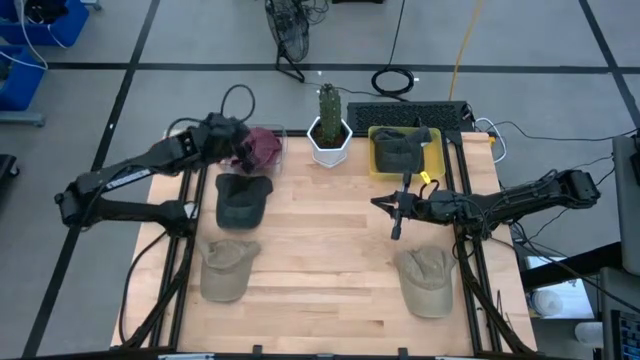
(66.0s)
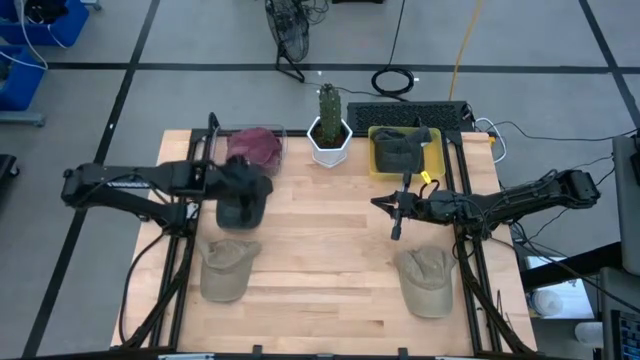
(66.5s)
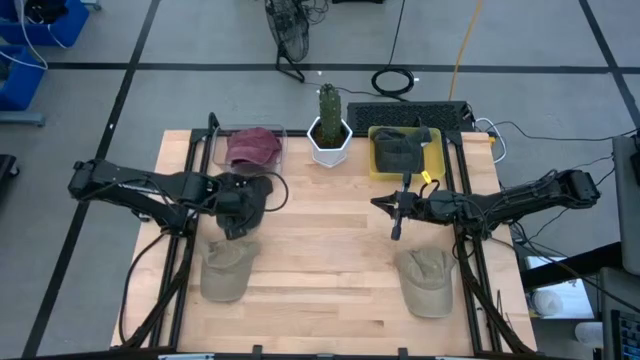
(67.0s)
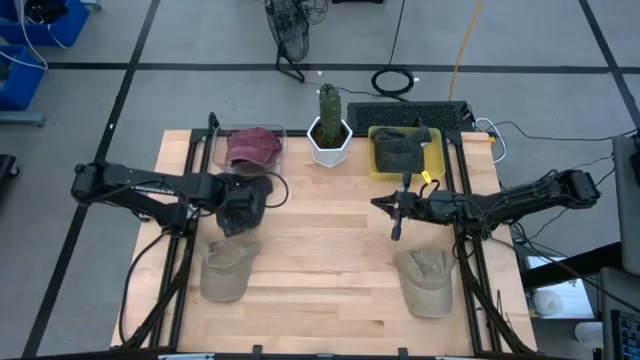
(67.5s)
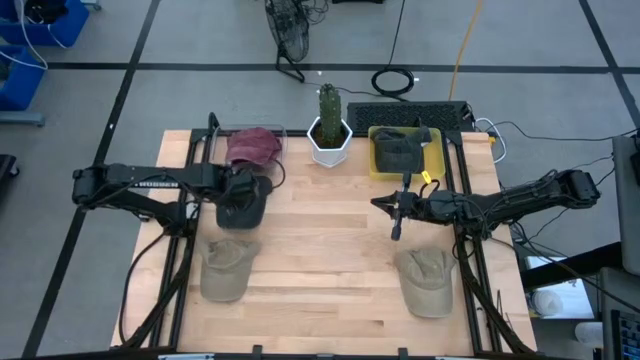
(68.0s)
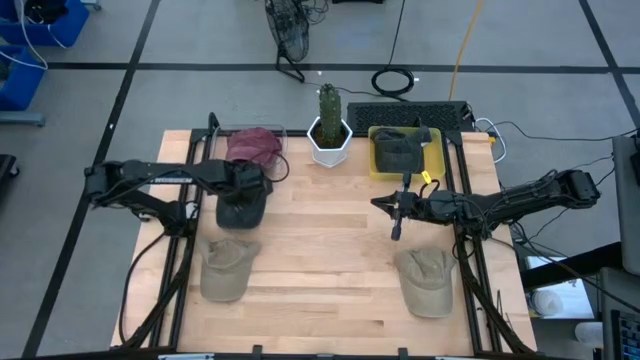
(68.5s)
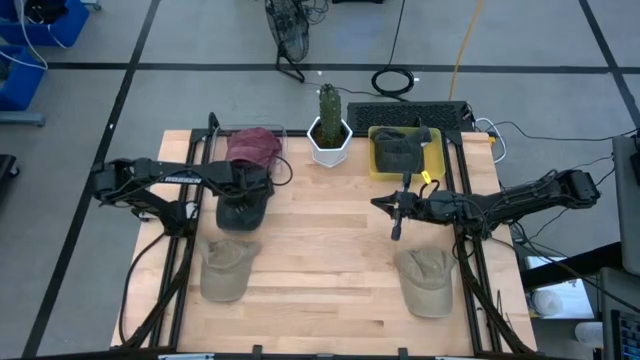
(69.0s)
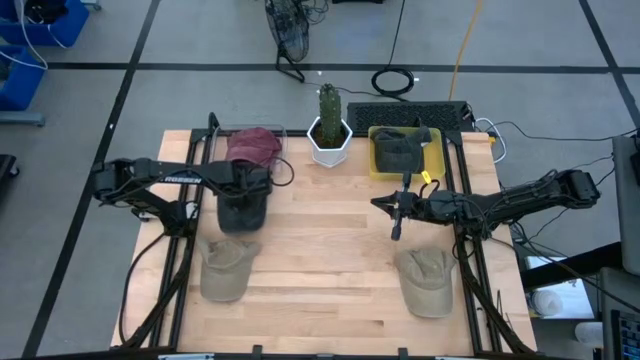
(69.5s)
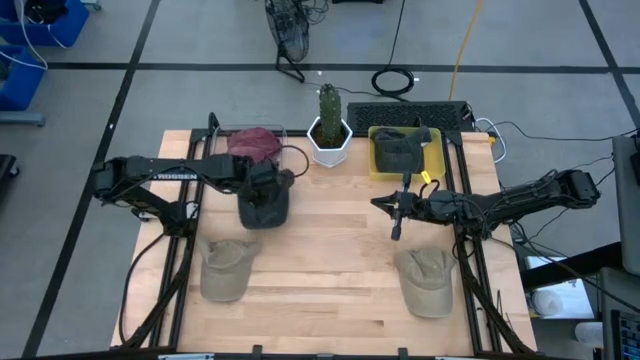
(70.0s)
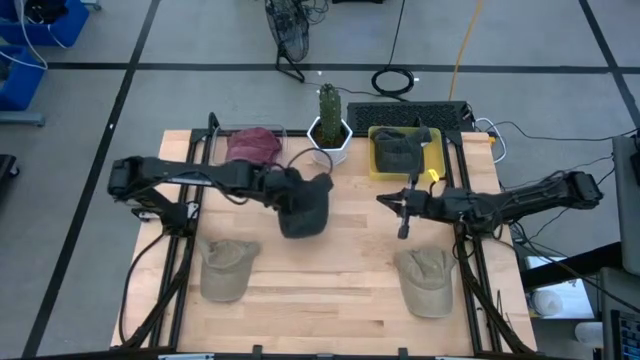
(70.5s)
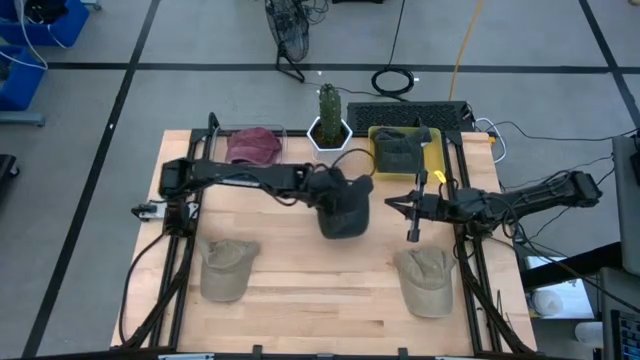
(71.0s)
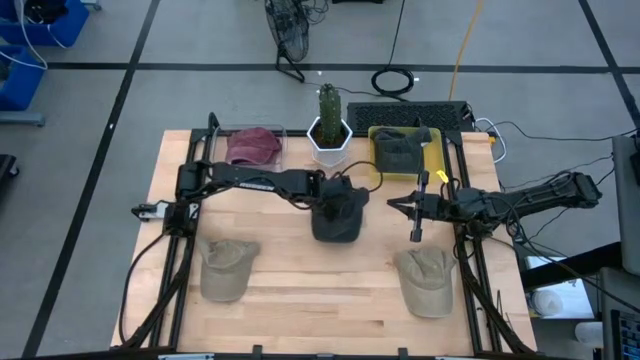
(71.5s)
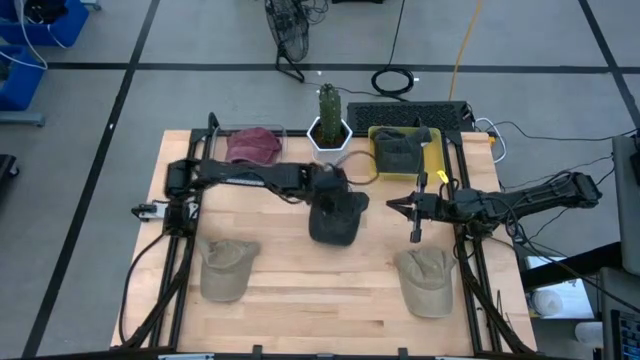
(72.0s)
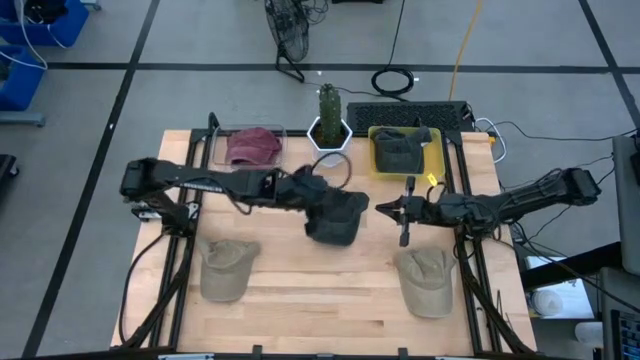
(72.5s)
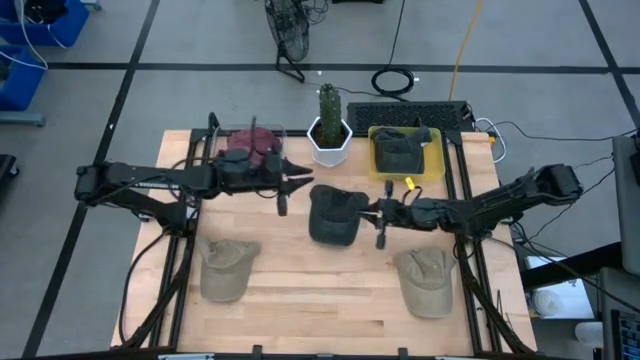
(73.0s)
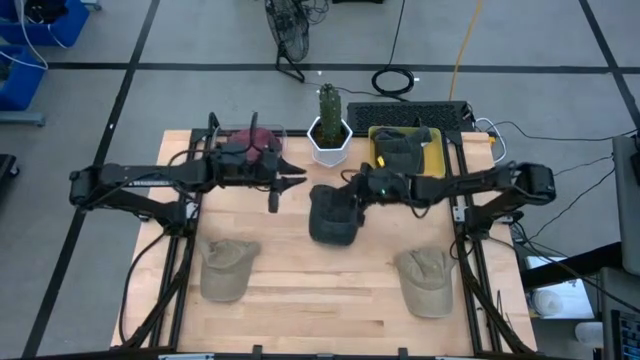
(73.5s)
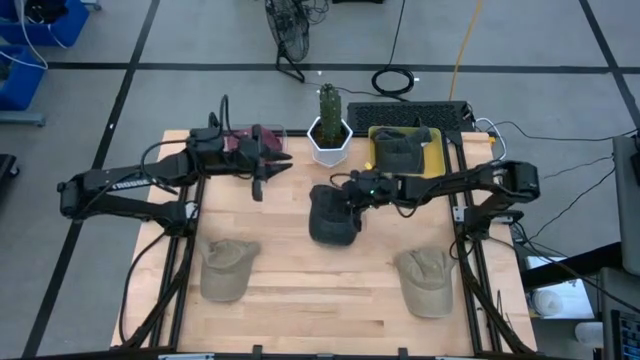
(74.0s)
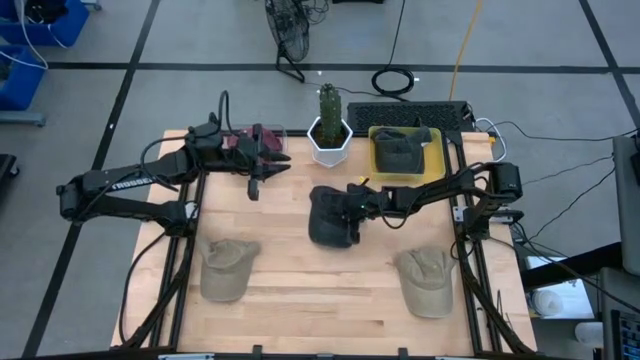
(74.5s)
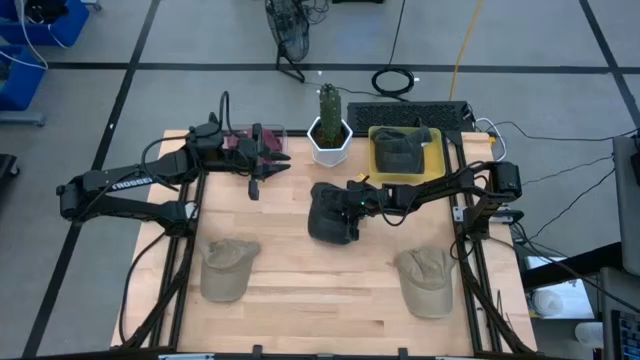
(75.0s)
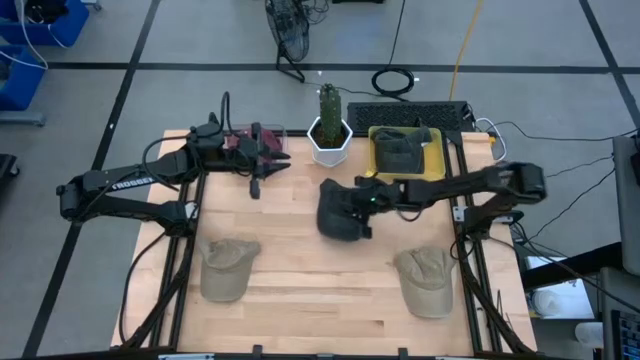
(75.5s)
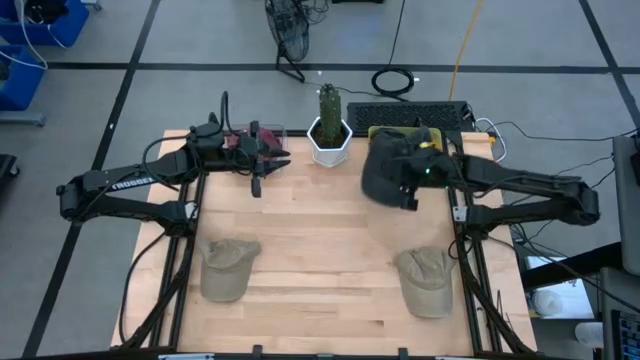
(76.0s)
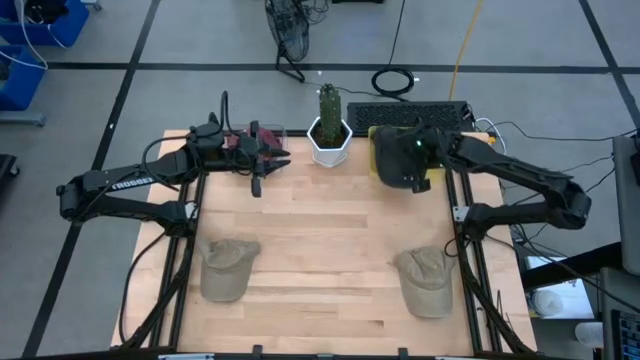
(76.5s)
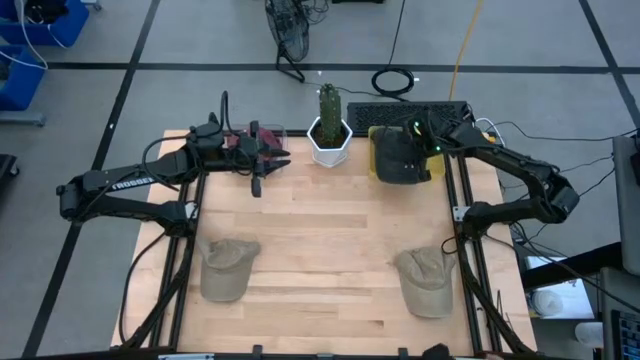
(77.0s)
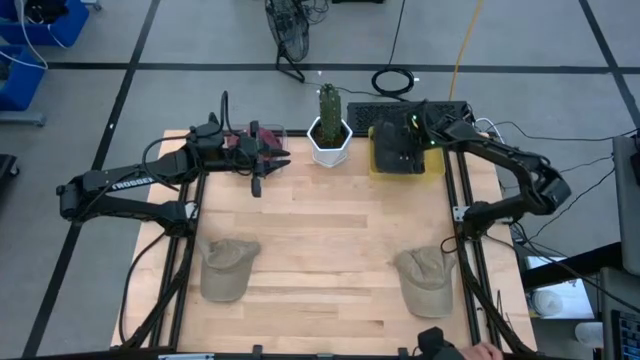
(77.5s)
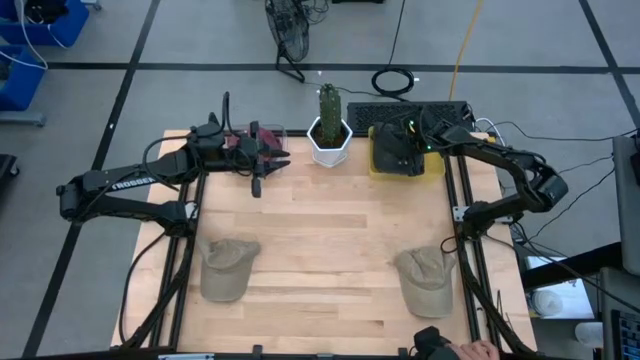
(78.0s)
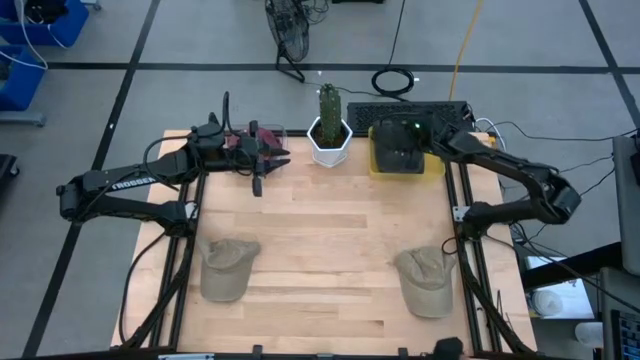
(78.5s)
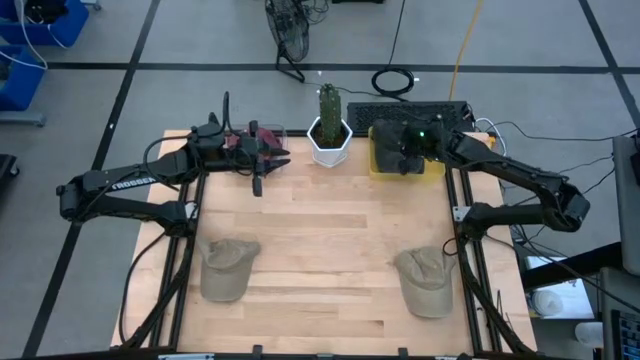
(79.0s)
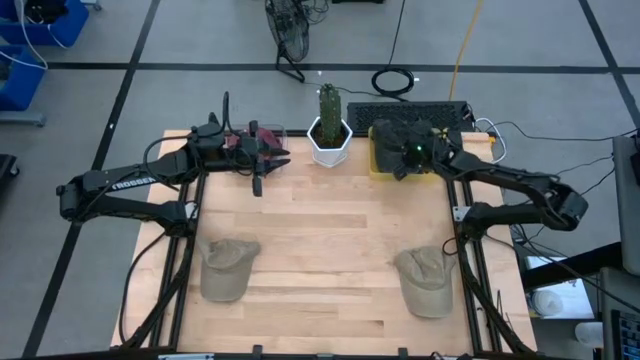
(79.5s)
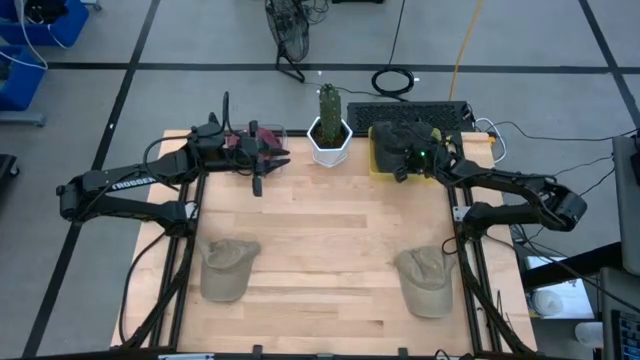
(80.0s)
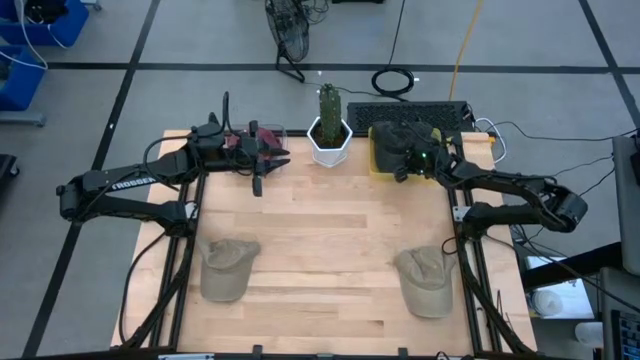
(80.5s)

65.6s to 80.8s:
Task: Pick & Place hat
Put the black cap into the yellow bin

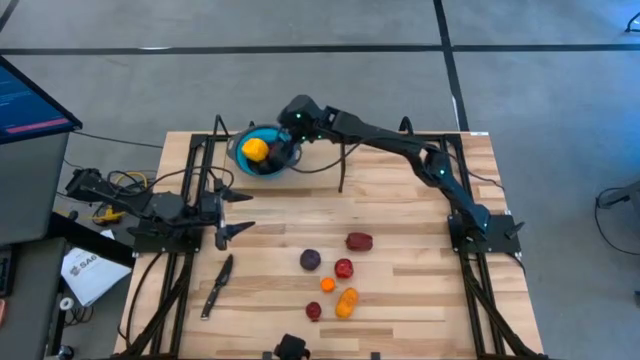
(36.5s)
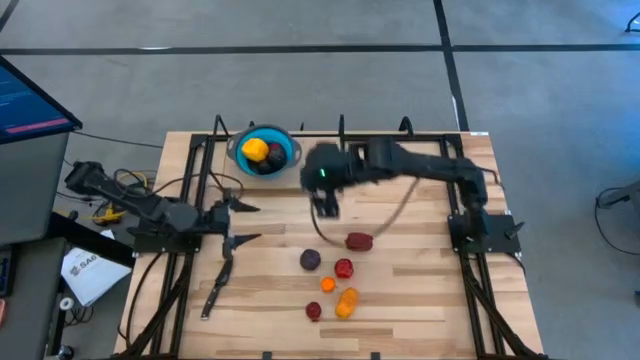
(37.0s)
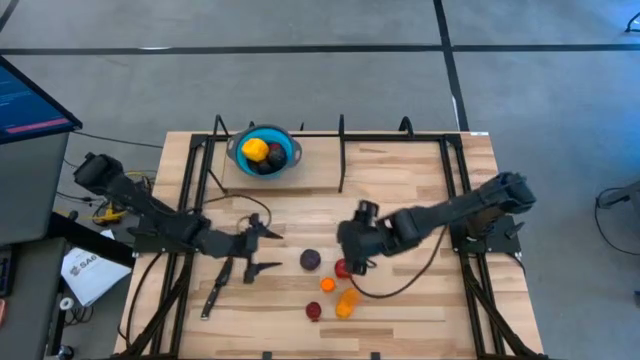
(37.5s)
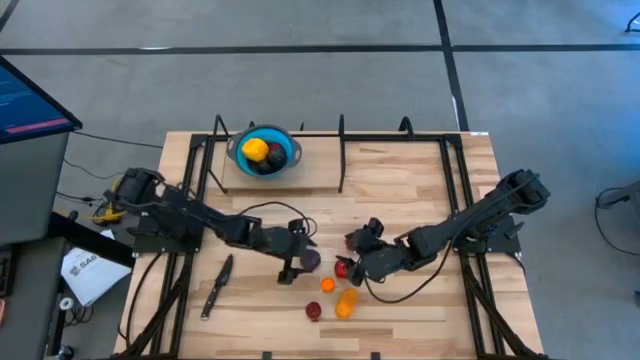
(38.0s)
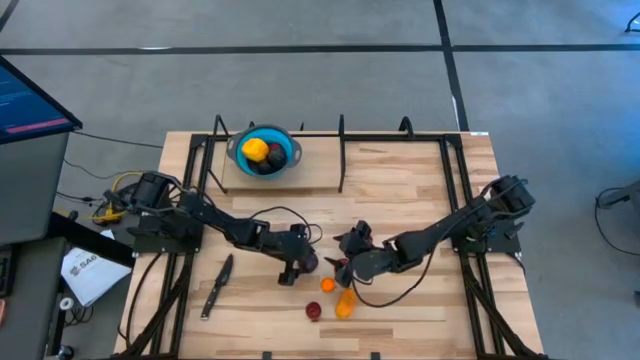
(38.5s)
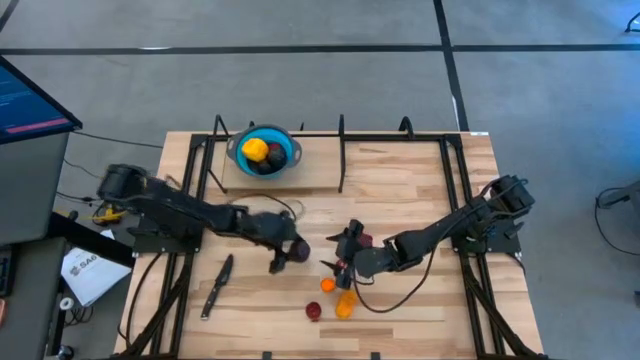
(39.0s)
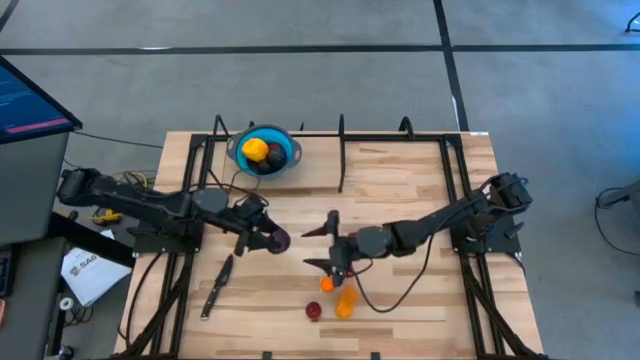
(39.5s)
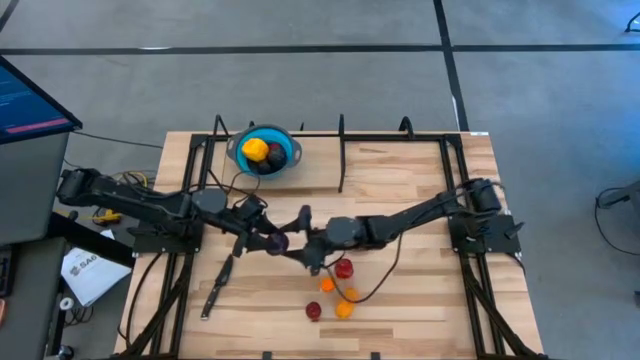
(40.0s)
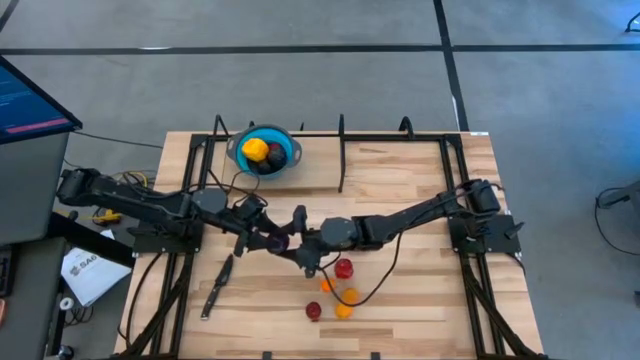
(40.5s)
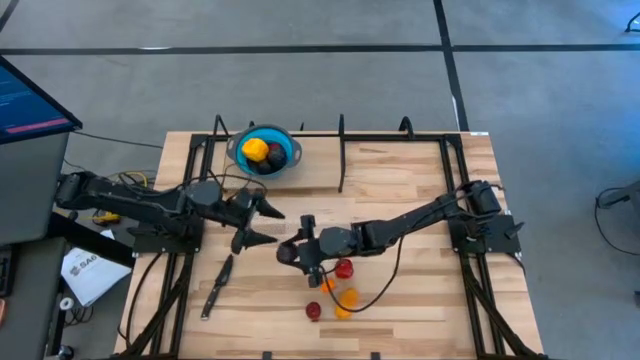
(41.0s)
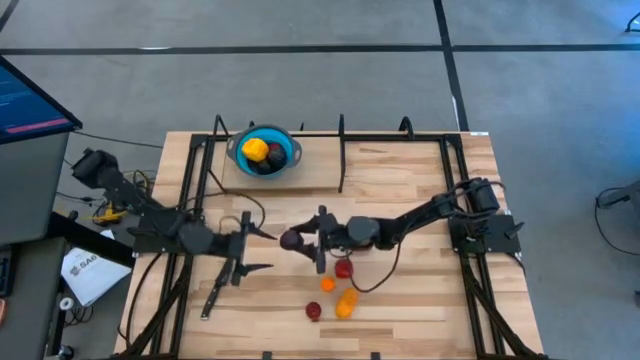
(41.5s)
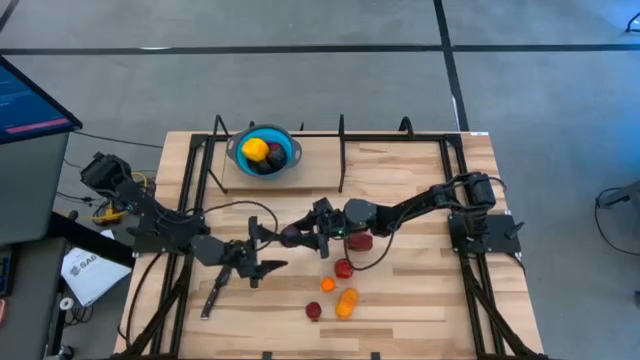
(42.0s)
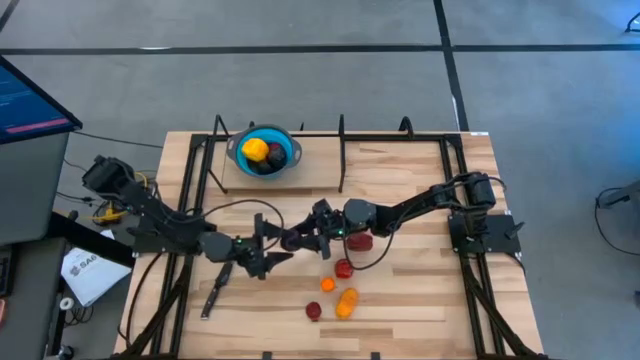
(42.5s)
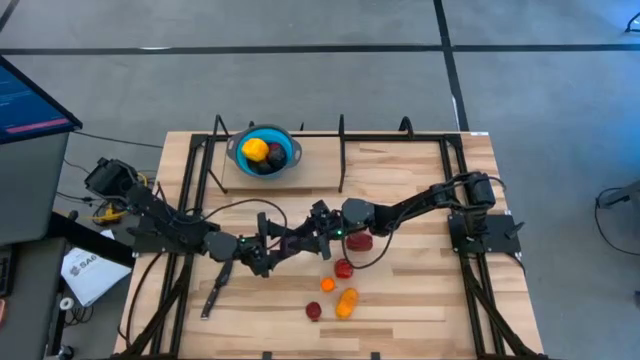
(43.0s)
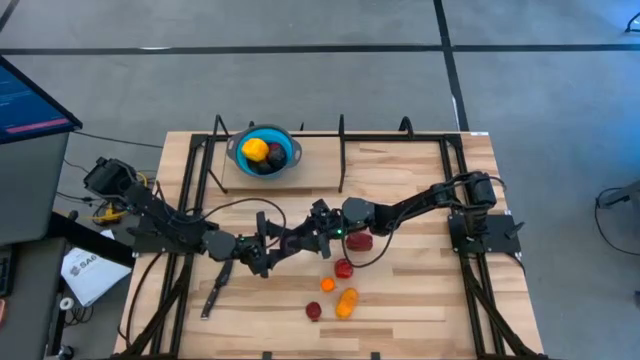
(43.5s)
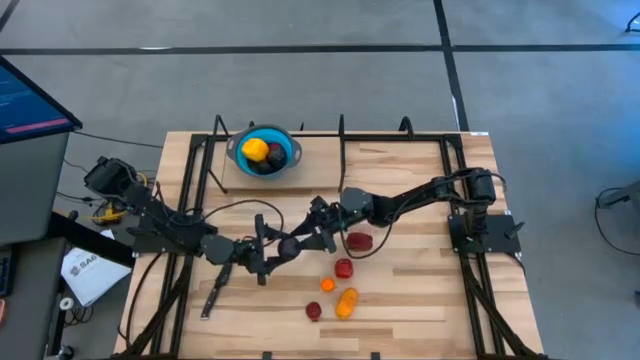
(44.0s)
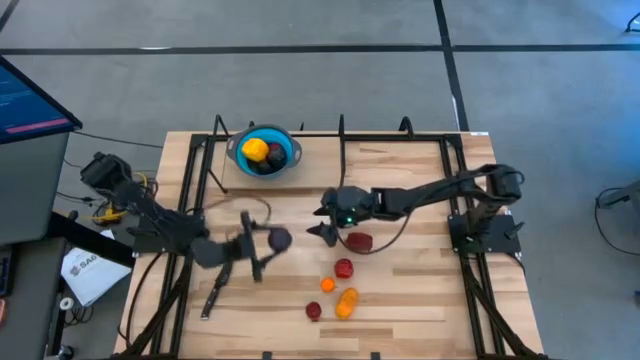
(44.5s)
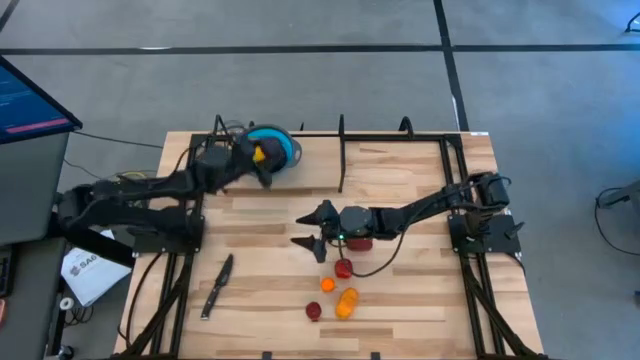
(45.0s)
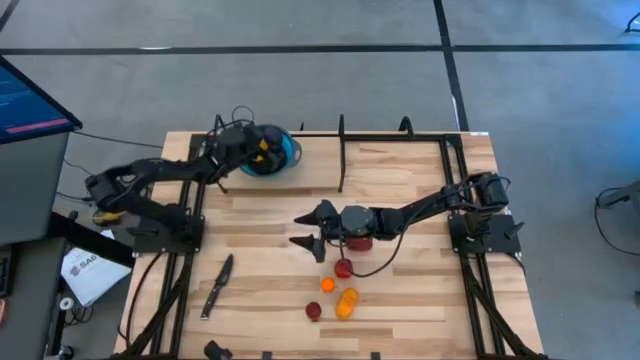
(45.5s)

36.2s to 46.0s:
Task: Pick & Place Fruit
Put the plum in the blue strainer bowl on the shelf
